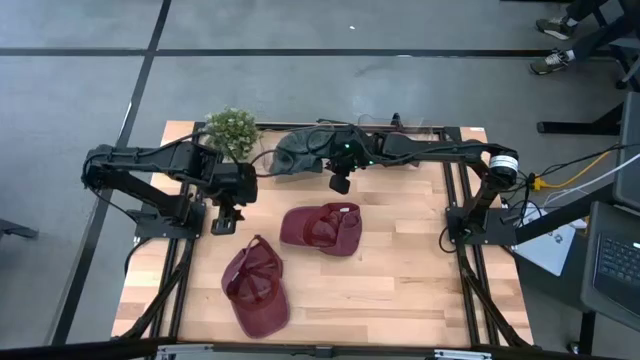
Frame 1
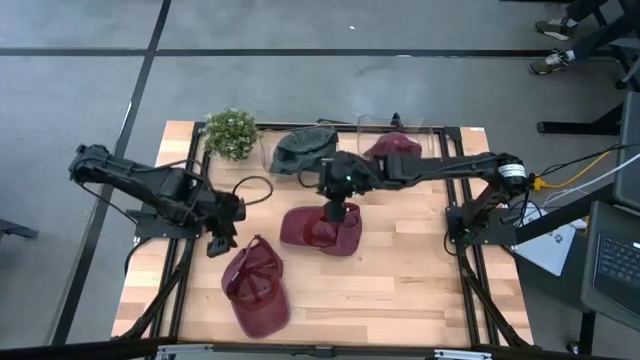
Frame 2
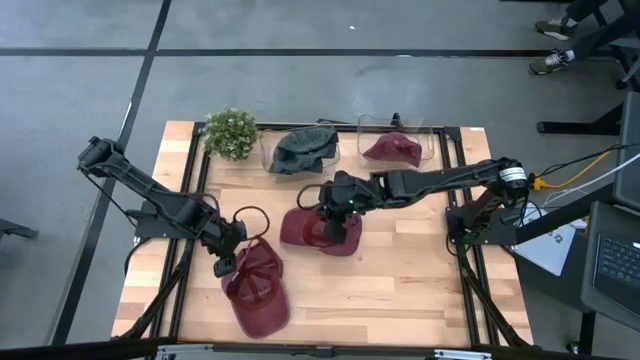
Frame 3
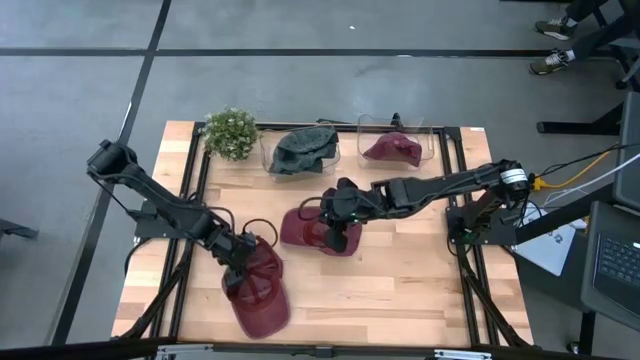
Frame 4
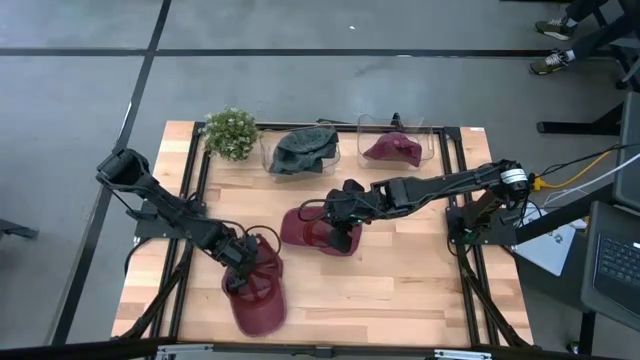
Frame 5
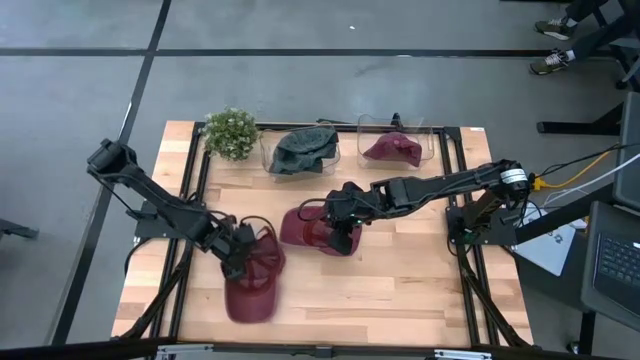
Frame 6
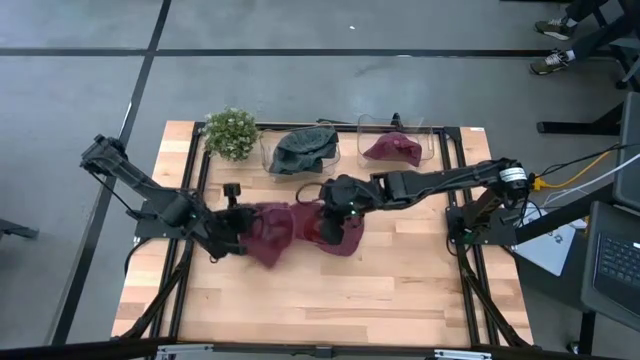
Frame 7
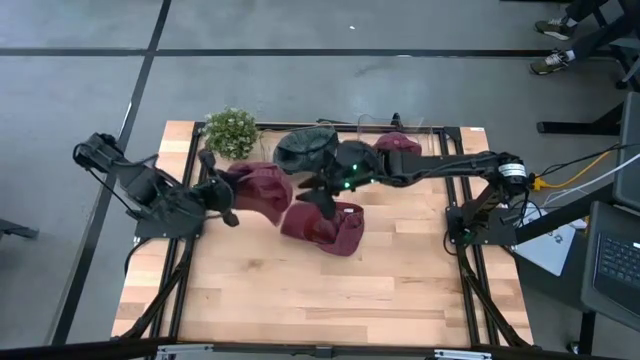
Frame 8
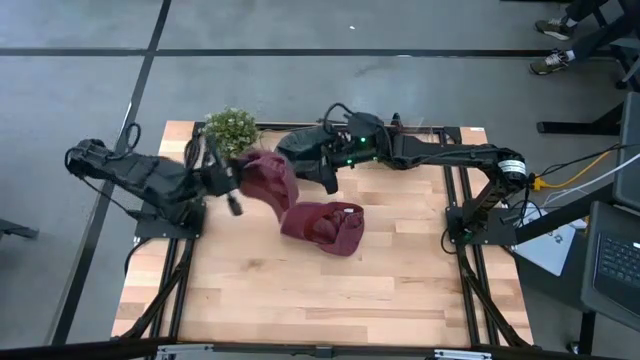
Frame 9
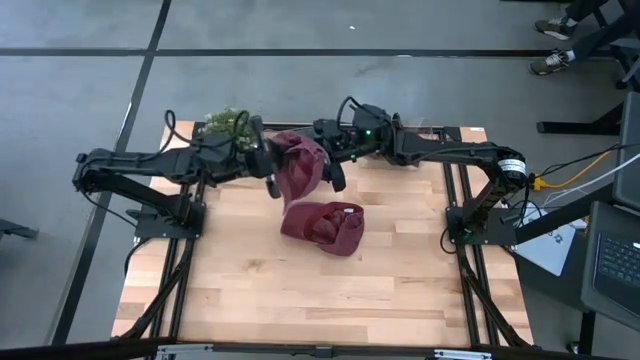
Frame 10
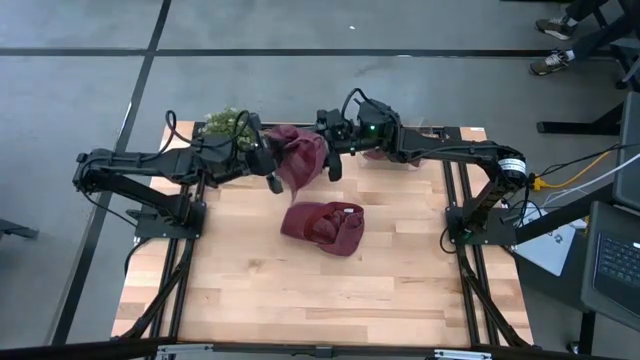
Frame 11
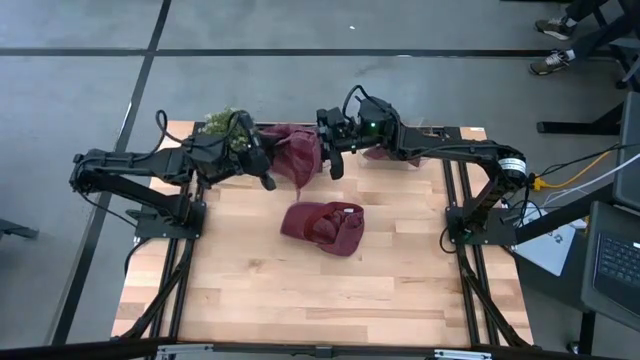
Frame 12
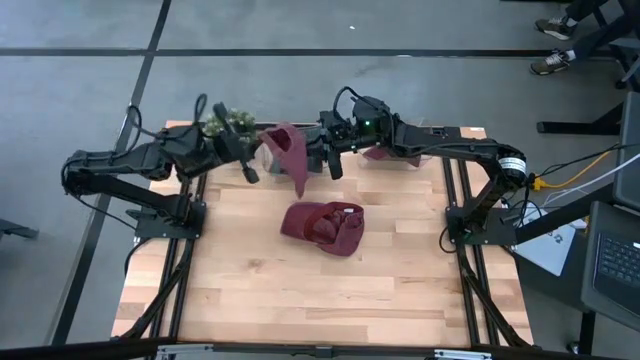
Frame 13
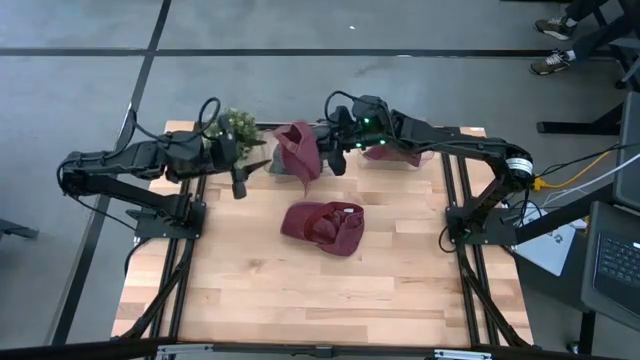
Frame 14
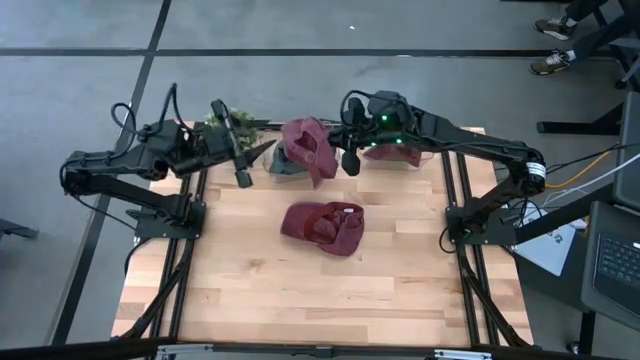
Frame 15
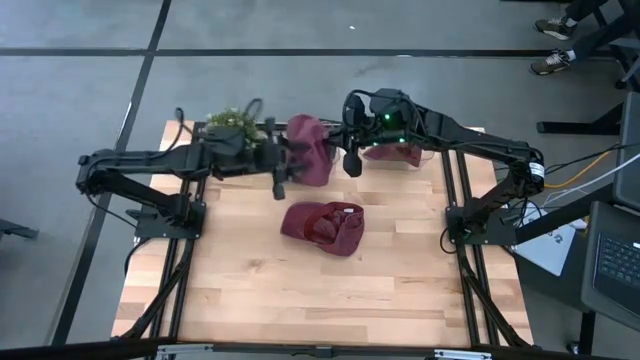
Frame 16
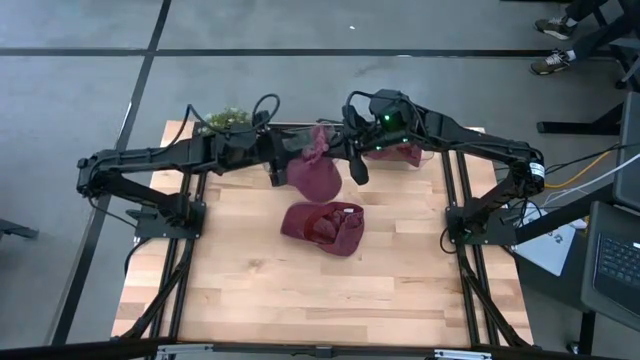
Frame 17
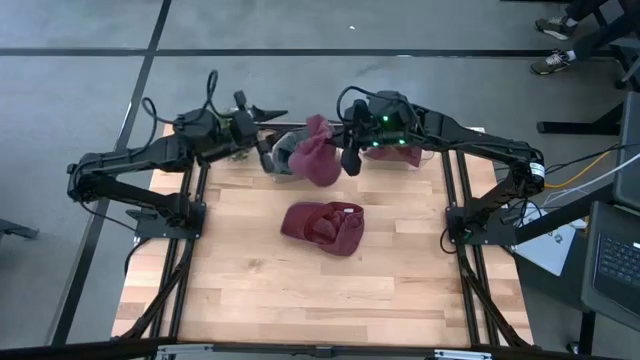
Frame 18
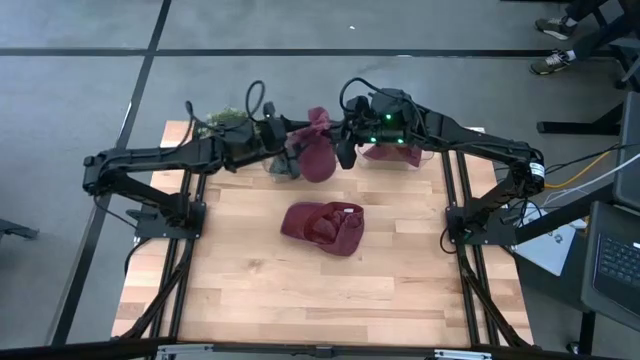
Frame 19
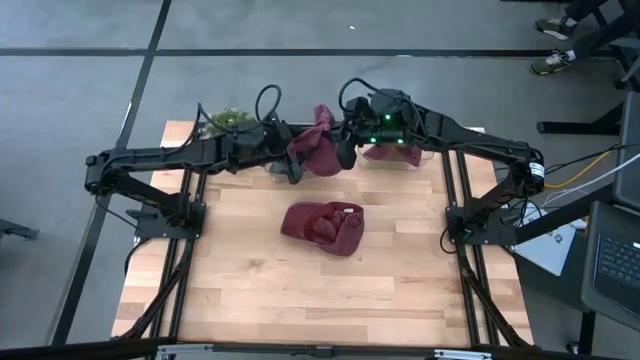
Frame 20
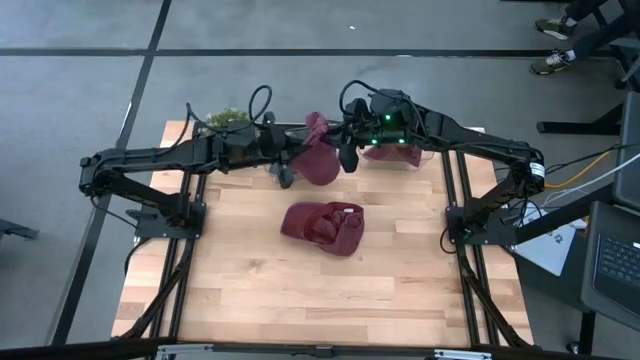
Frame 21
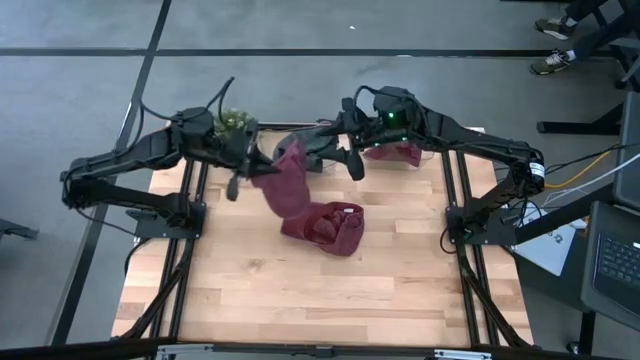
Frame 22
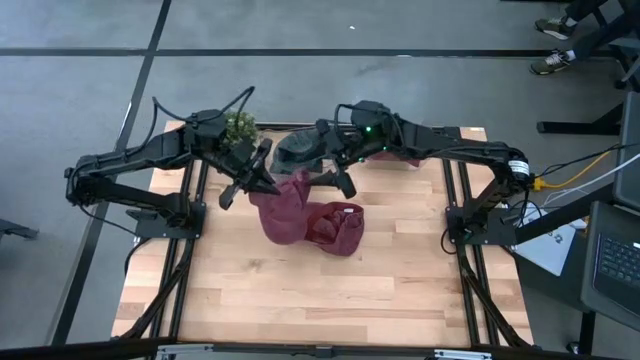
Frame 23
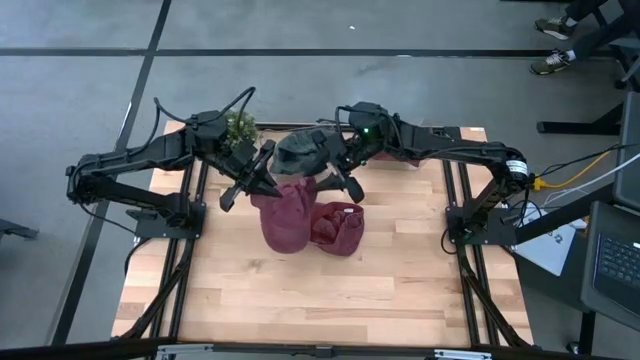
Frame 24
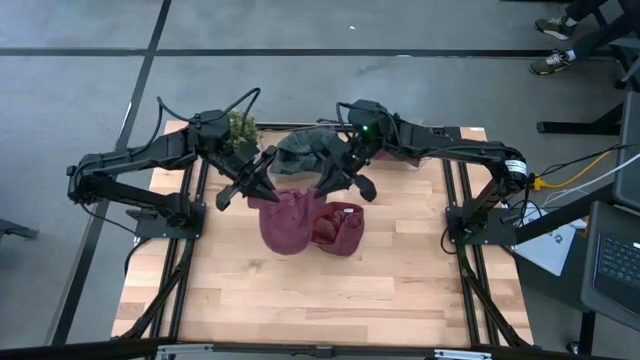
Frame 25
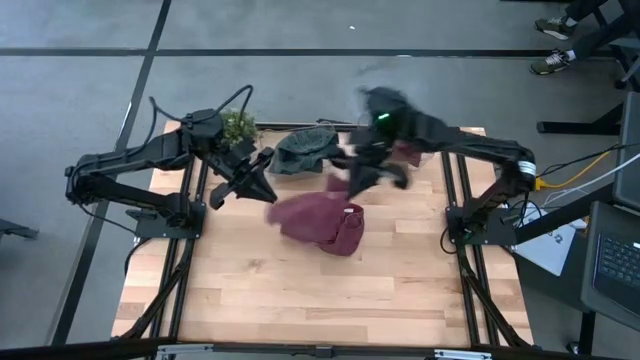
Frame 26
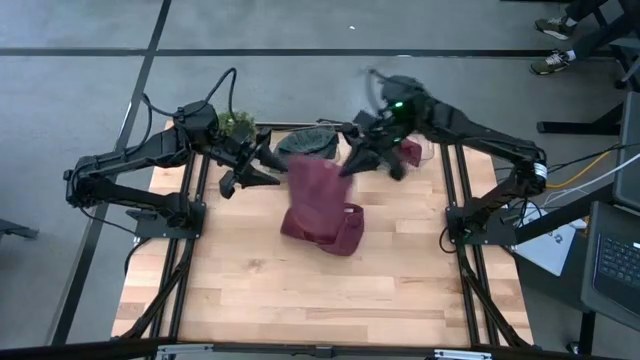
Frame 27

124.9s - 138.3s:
Task: Pick & Place hat
Put the bottom red cap on the red cap in the right transparent bin

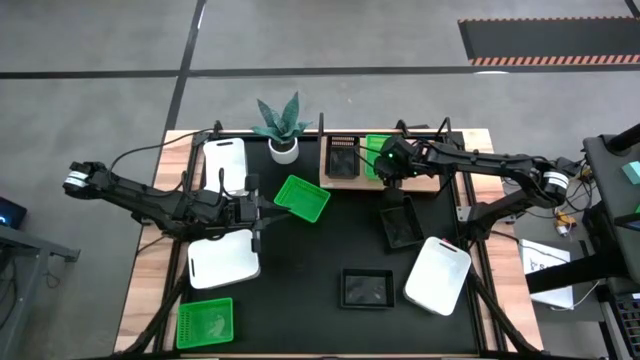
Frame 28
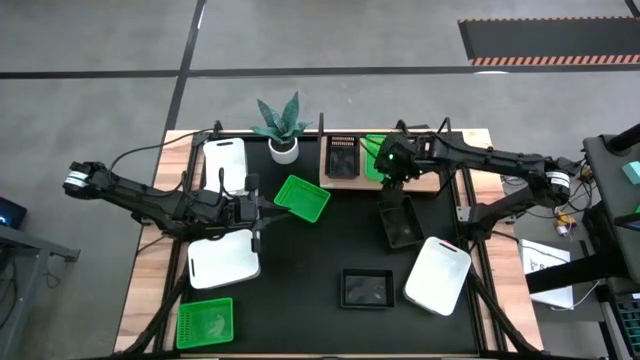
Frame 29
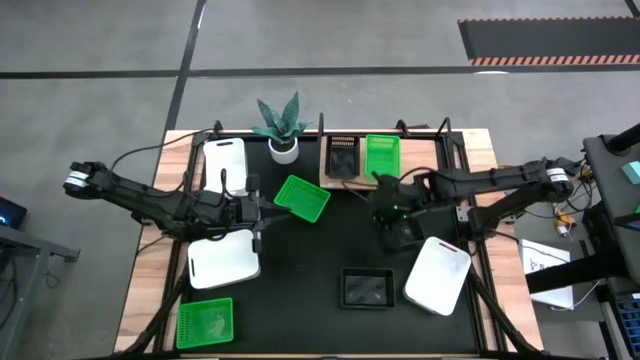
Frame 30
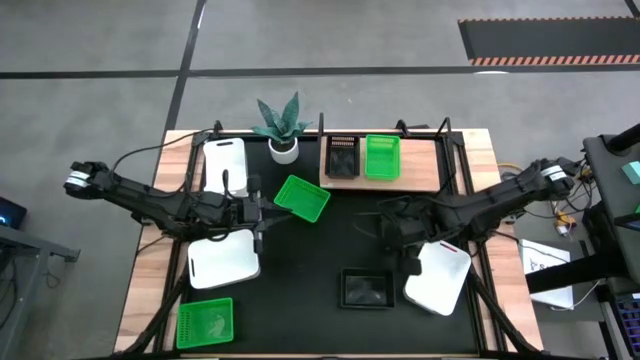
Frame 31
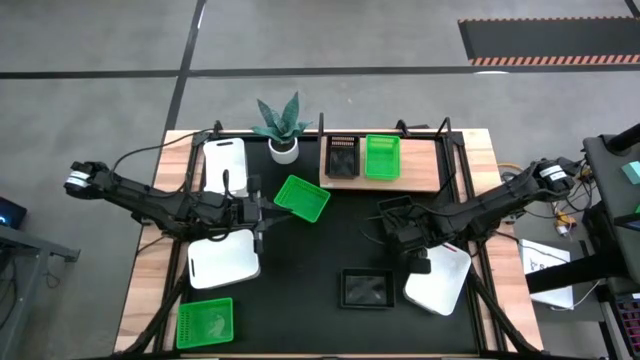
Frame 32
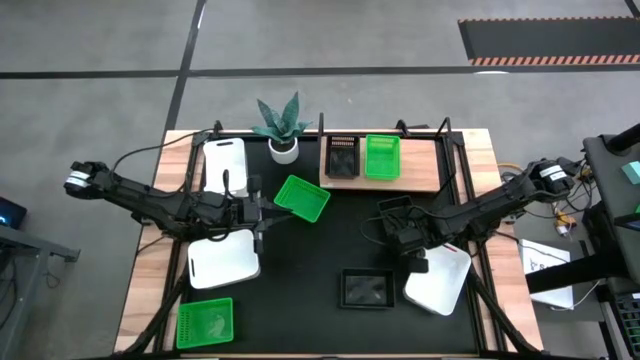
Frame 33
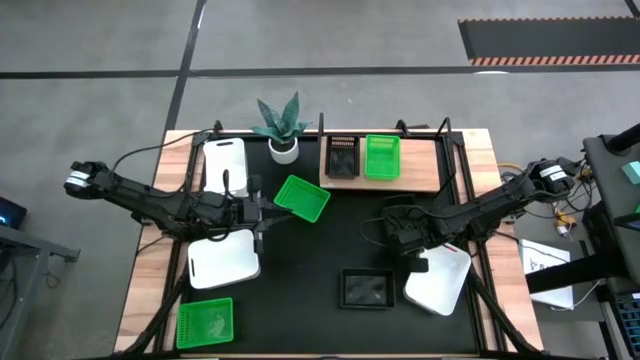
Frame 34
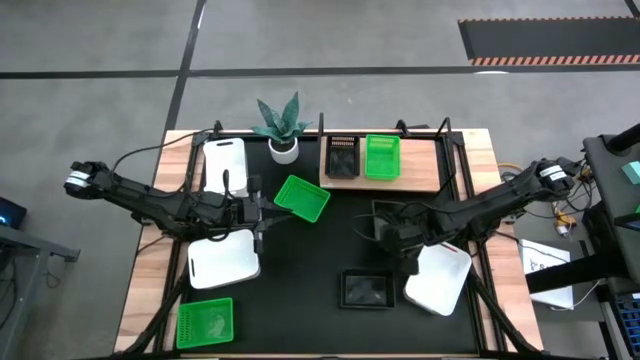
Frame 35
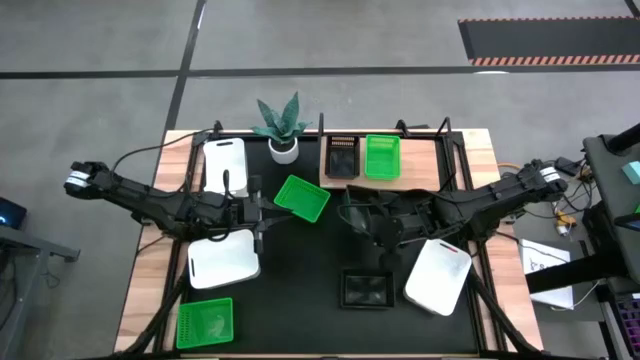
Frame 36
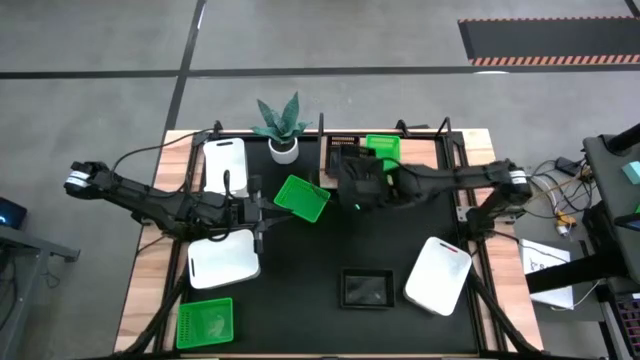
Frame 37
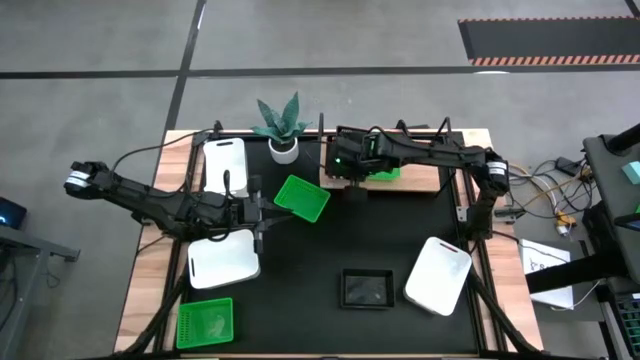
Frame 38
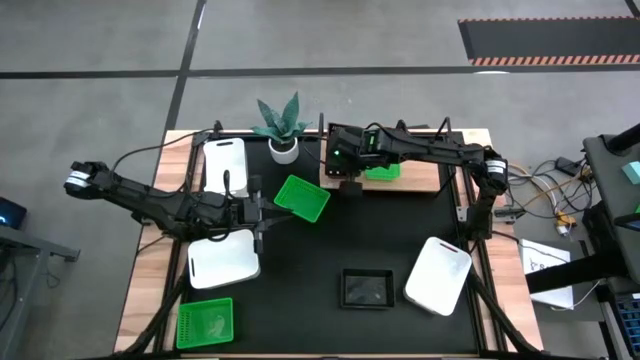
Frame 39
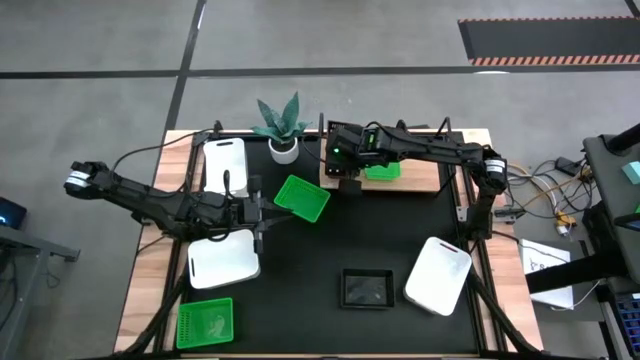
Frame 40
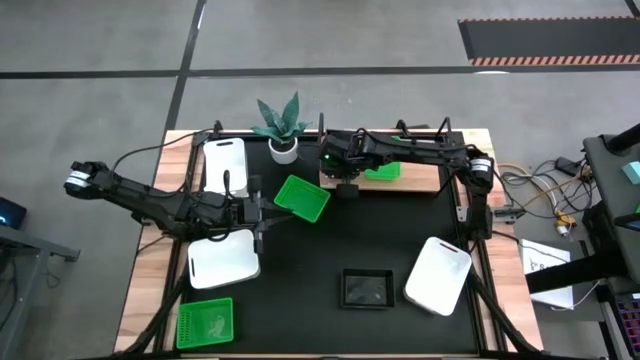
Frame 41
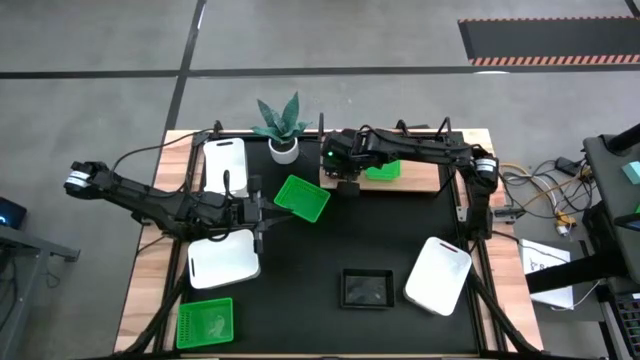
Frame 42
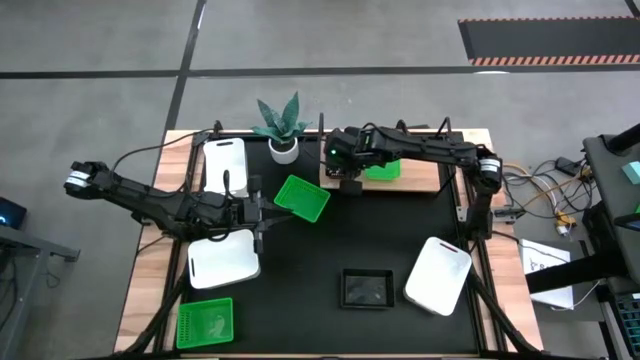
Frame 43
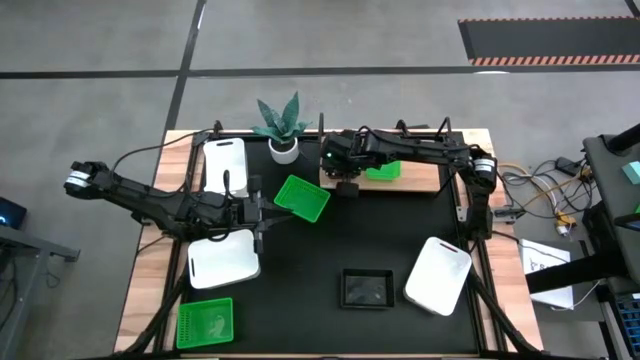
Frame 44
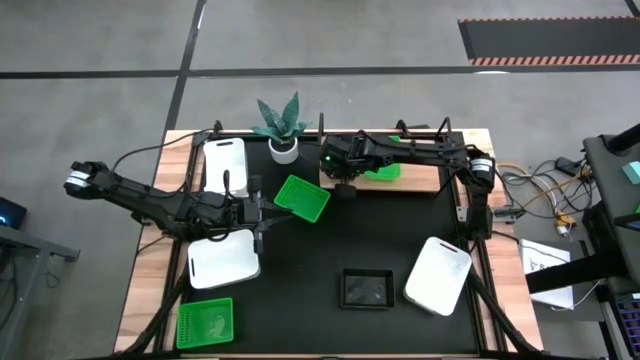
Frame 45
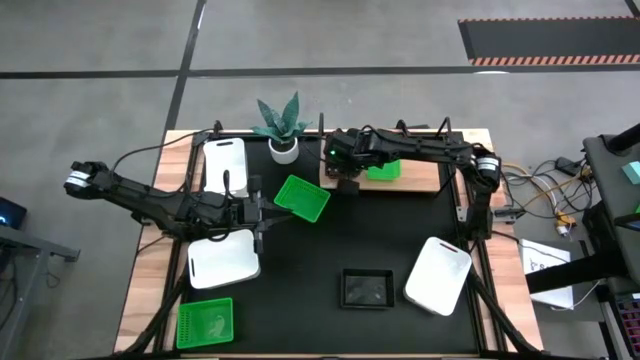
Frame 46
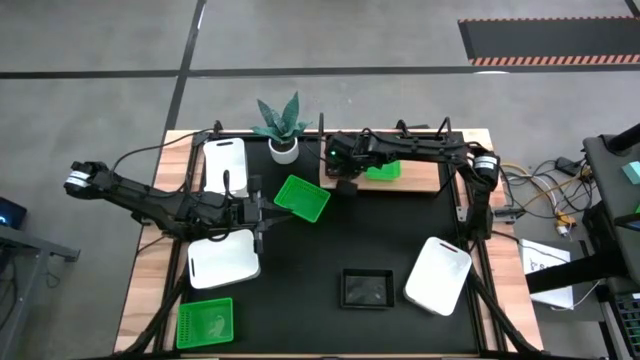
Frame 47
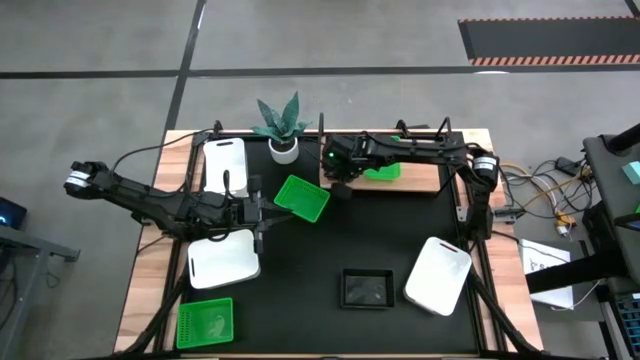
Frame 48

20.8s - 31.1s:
Task: Stack baskets on shelf by color
Stack the top black bin on the black bin on the shelf
